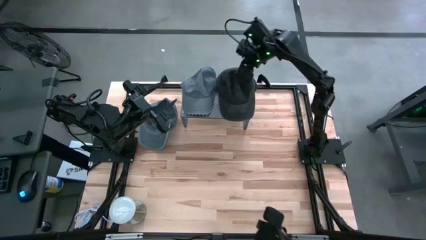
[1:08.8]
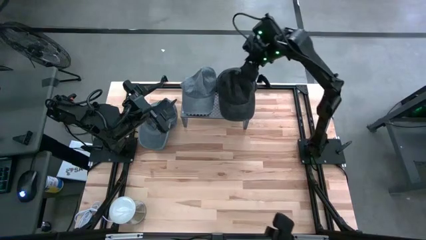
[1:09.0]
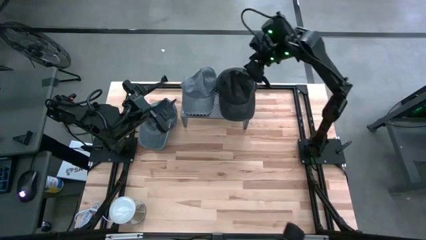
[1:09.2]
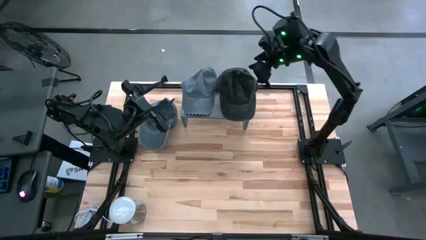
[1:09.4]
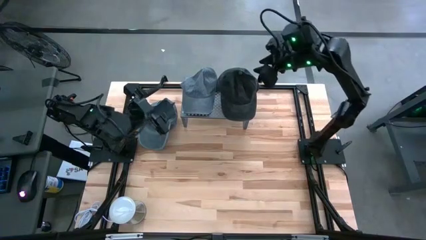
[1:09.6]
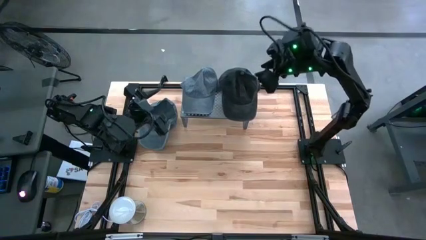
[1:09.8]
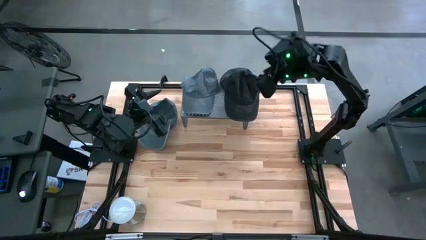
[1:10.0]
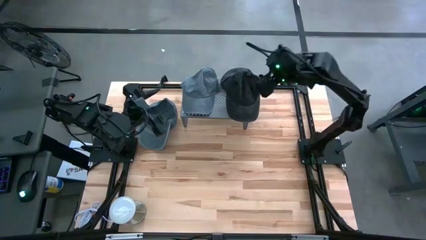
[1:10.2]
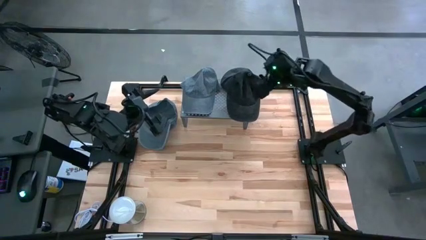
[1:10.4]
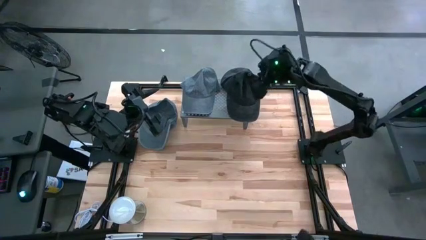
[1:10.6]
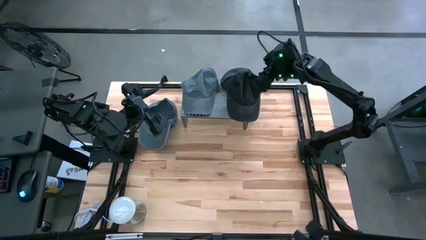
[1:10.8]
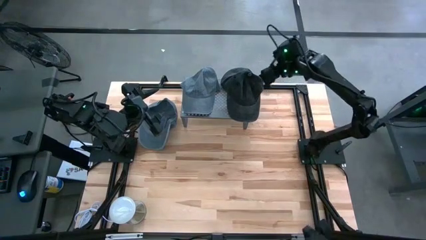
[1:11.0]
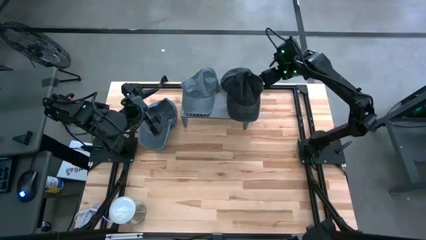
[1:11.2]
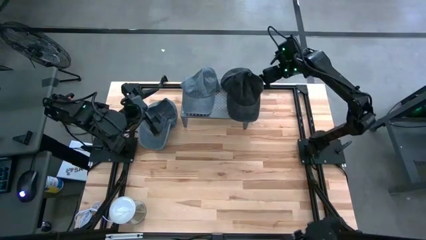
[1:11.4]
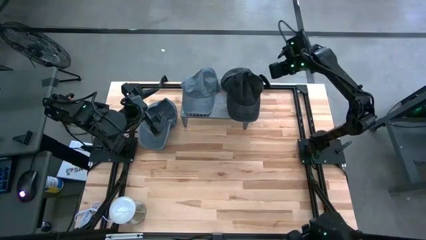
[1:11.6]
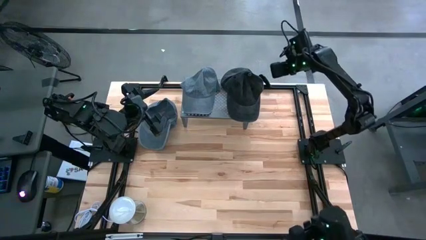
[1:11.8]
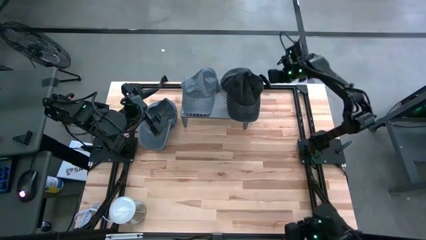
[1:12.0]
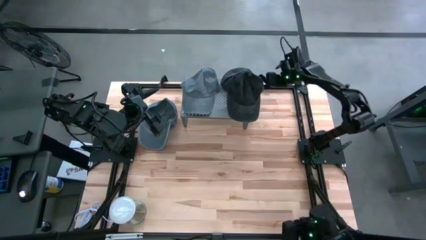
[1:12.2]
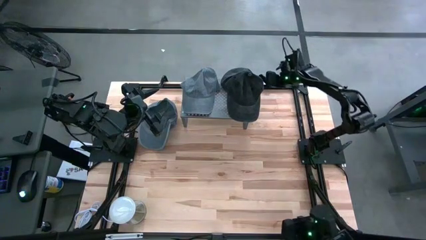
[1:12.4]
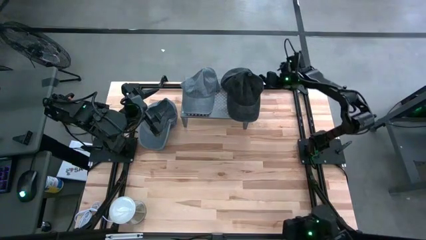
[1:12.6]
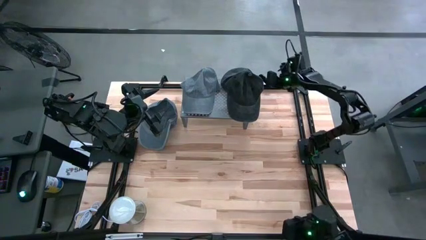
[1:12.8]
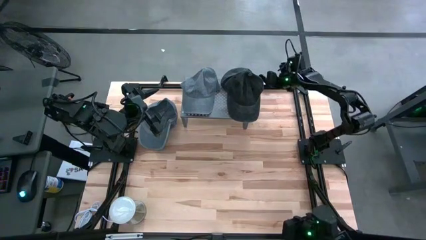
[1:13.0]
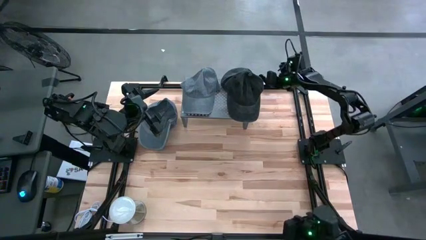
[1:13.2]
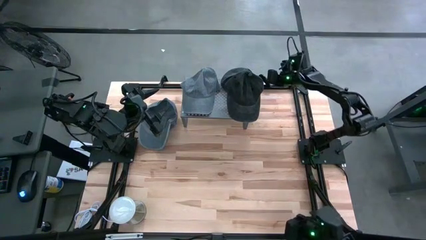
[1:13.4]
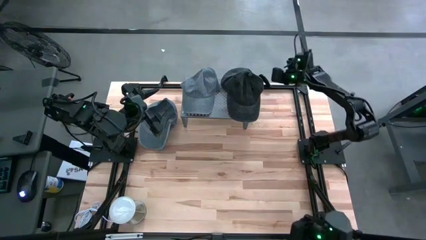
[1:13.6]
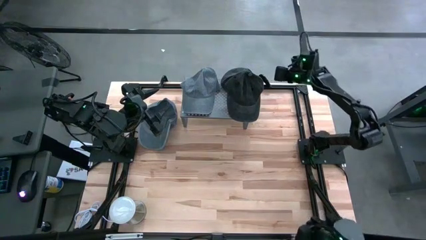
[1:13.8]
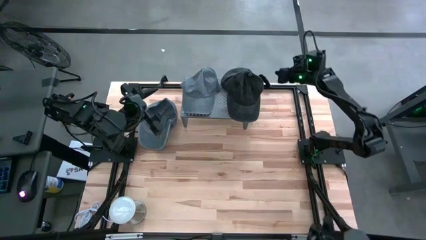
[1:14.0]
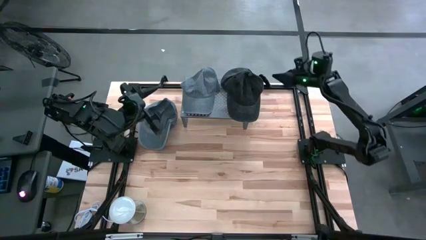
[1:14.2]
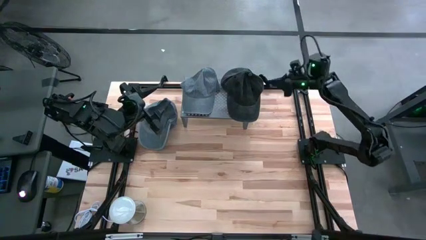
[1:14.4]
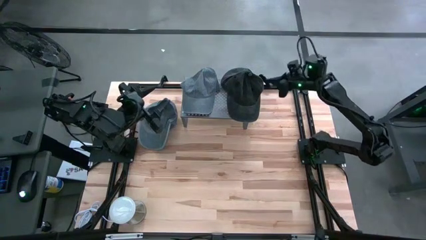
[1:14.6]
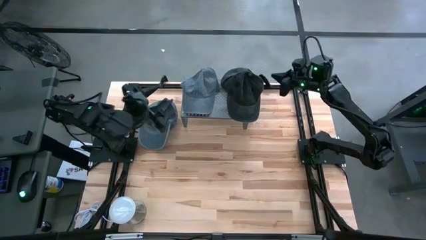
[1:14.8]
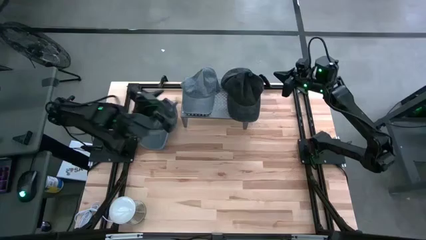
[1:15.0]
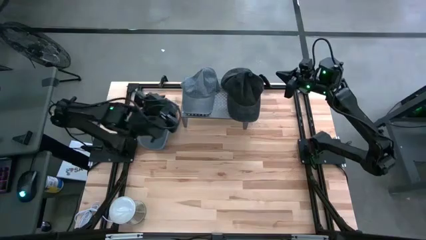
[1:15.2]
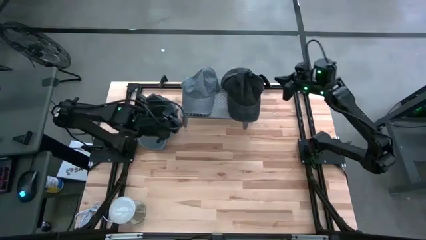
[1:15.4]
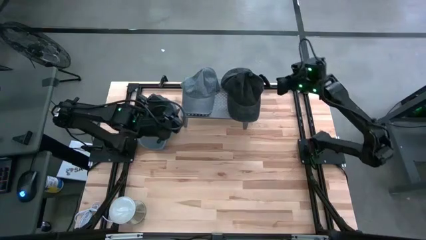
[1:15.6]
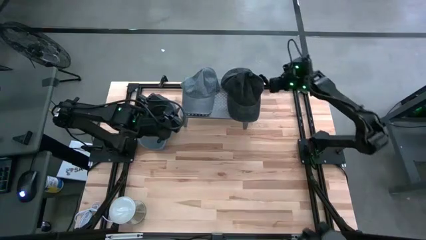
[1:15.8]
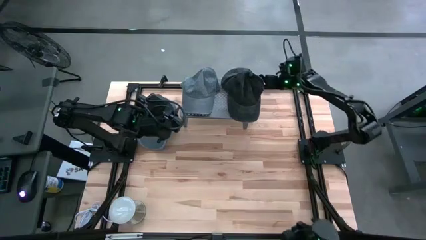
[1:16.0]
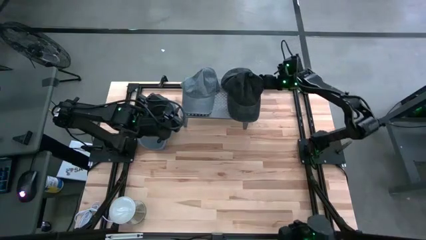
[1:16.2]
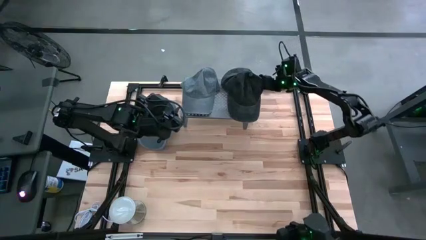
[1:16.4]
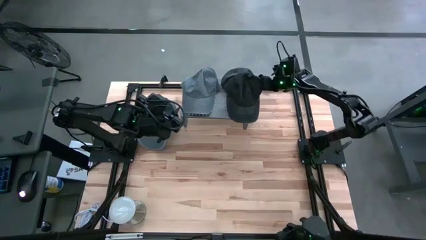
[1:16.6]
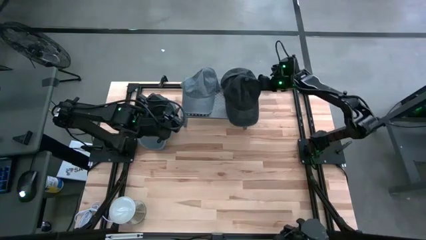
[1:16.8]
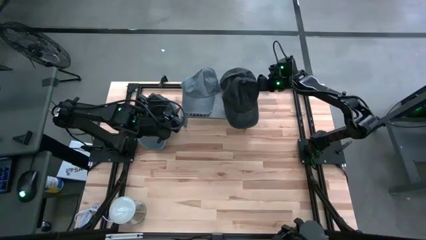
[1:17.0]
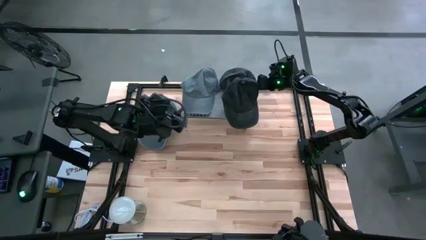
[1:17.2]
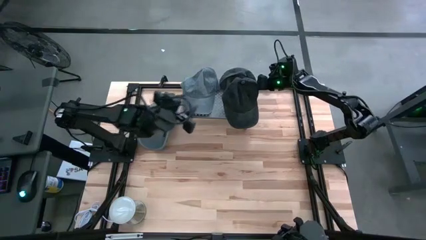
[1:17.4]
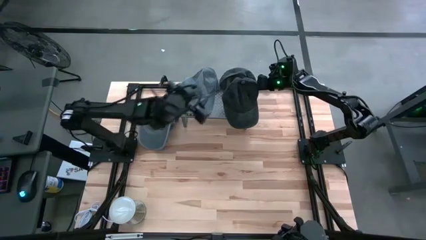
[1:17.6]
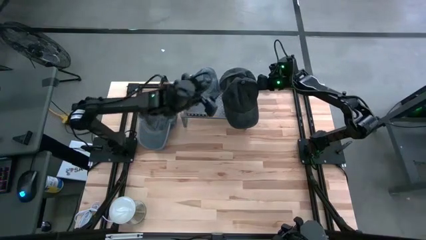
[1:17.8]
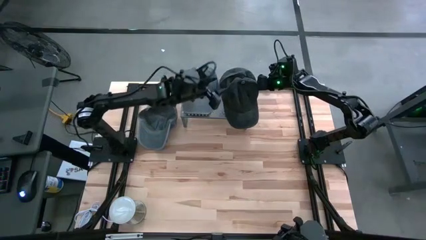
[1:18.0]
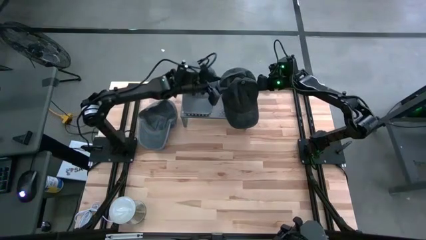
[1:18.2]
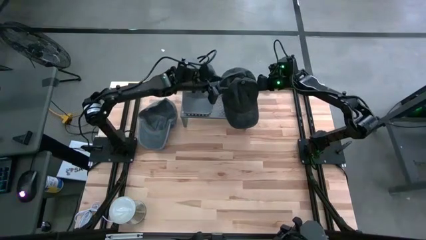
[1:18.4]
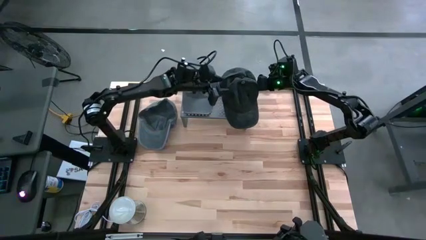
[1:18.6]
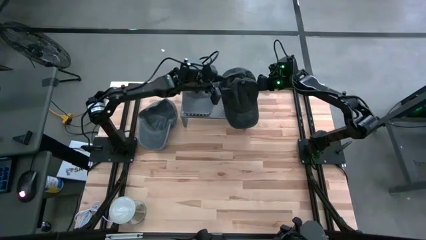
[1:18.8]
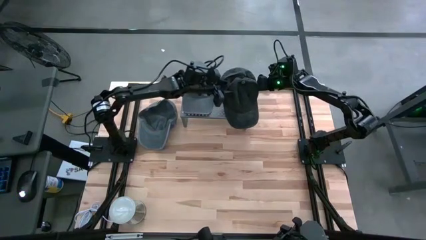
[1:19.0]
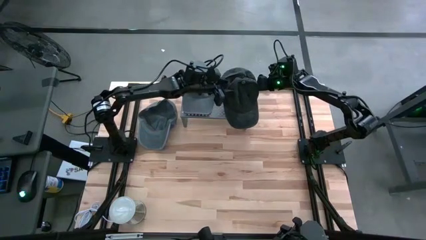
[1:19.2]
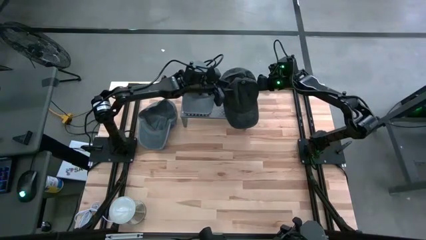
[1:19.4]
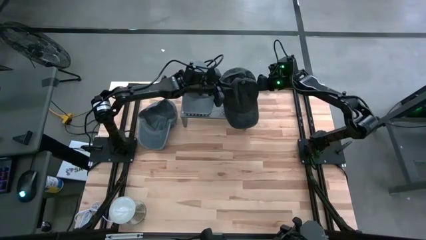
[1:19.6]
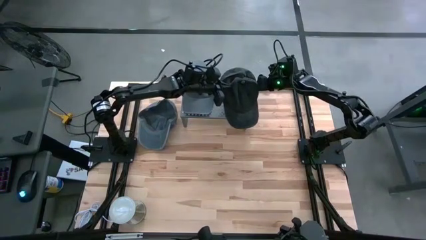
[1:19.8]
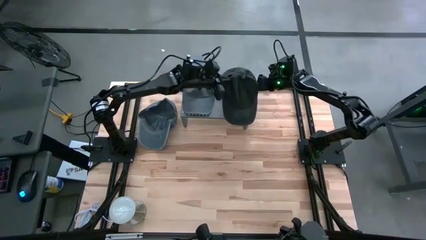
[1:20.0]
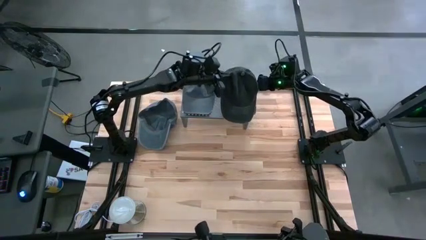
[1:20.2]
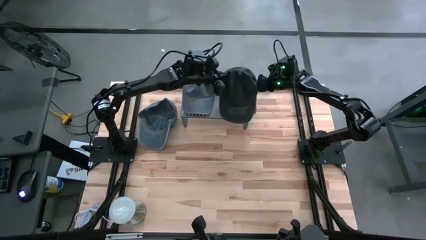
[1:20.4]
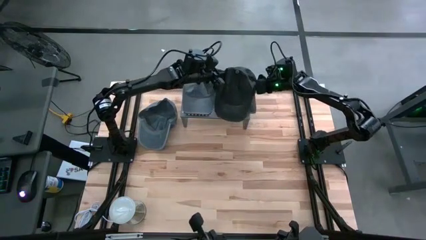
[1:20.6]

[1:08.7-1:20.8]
Task: Pick & Place hat
Adjust the black cap on the shelf

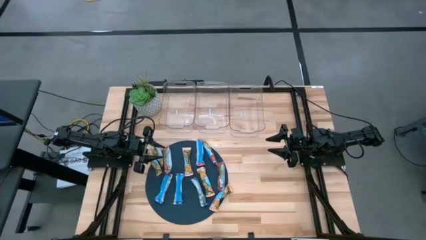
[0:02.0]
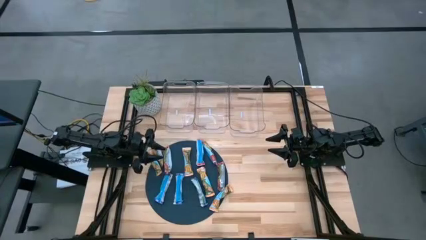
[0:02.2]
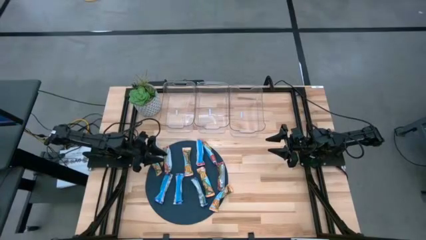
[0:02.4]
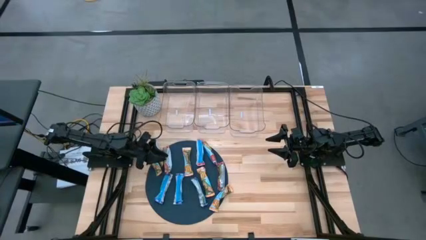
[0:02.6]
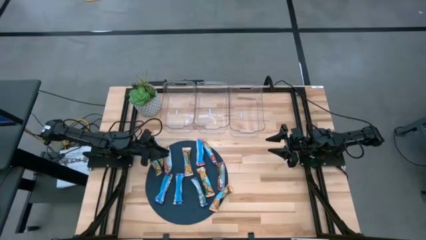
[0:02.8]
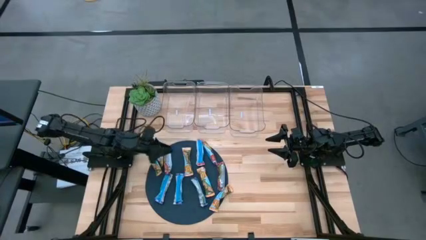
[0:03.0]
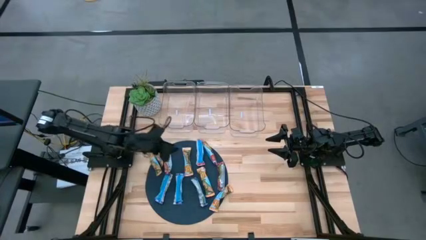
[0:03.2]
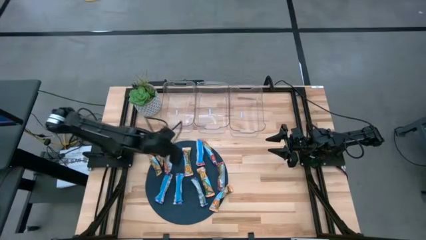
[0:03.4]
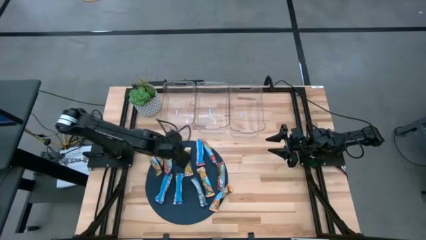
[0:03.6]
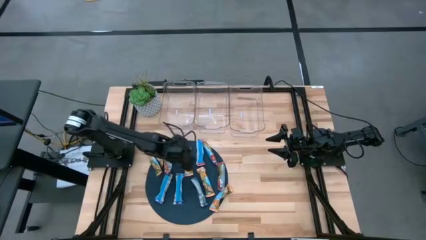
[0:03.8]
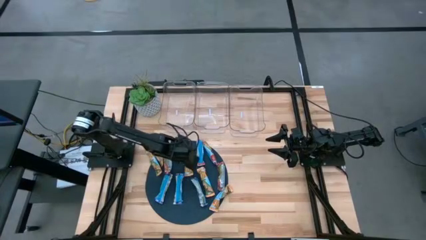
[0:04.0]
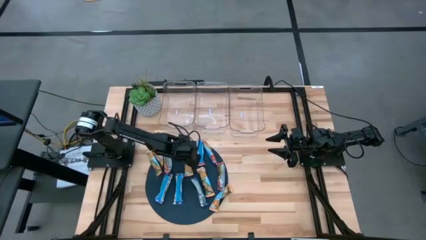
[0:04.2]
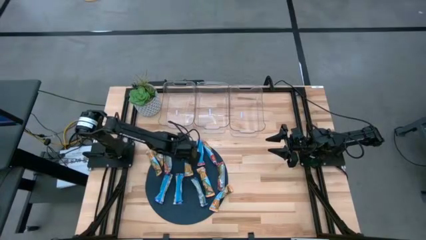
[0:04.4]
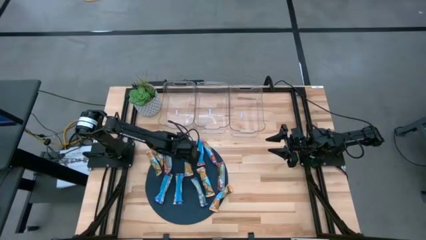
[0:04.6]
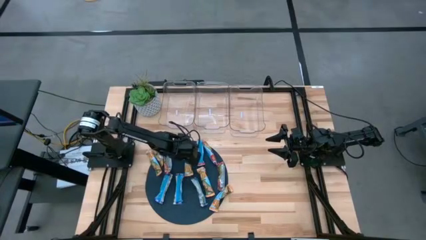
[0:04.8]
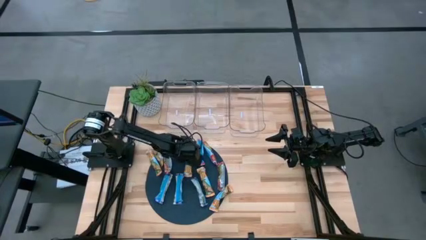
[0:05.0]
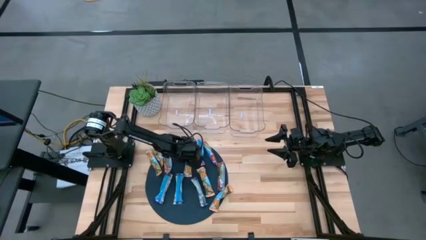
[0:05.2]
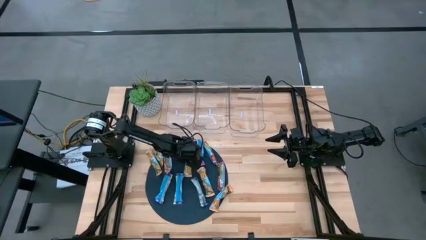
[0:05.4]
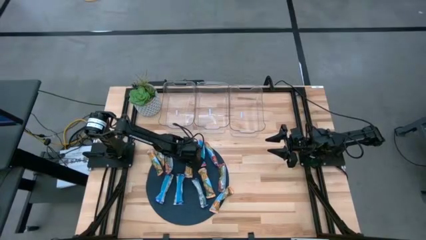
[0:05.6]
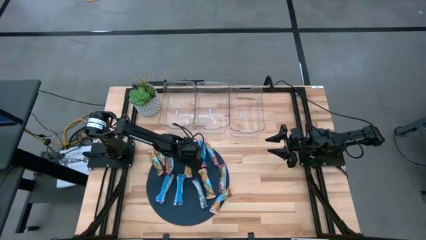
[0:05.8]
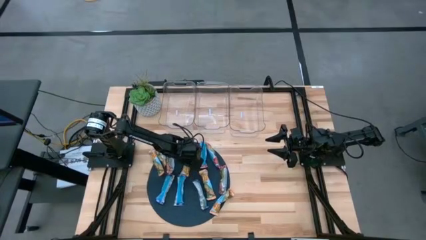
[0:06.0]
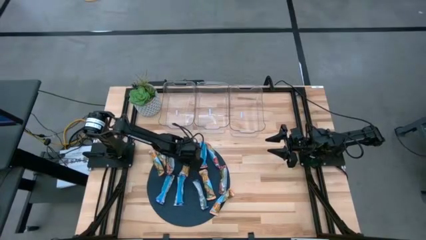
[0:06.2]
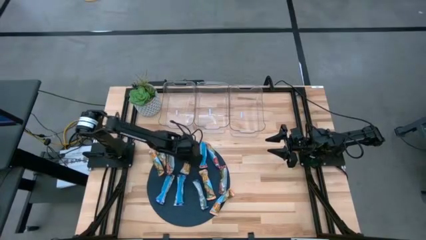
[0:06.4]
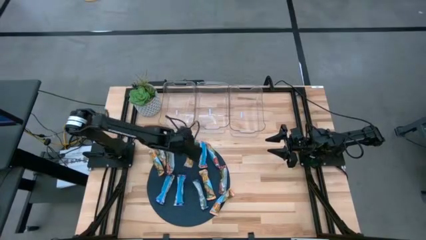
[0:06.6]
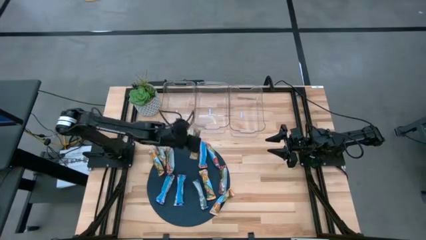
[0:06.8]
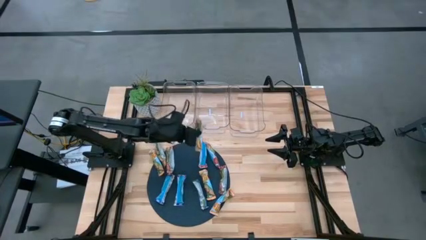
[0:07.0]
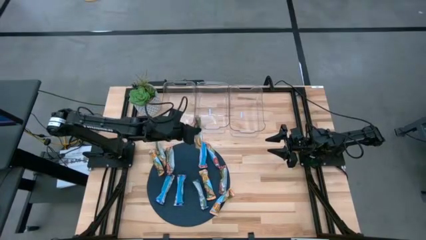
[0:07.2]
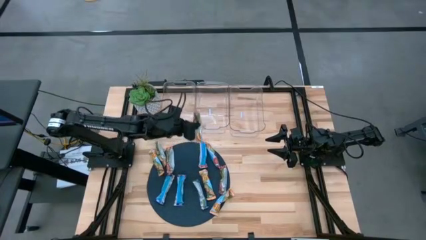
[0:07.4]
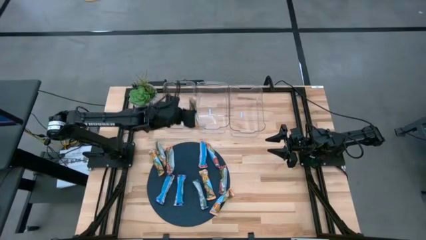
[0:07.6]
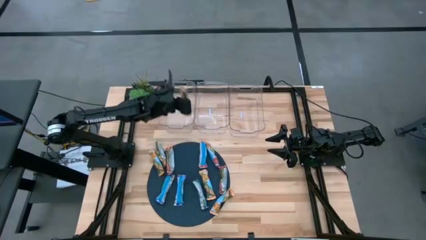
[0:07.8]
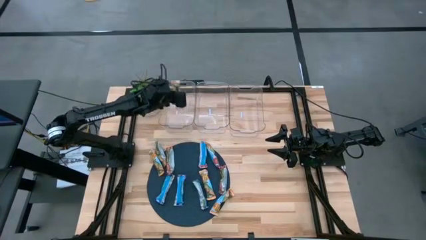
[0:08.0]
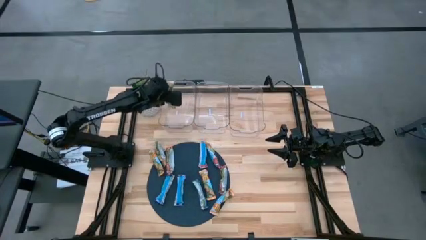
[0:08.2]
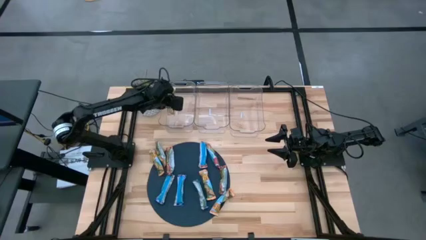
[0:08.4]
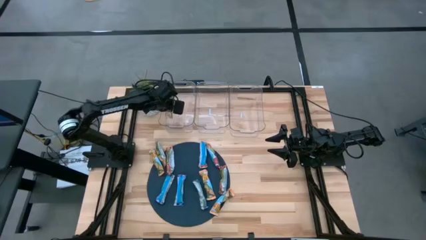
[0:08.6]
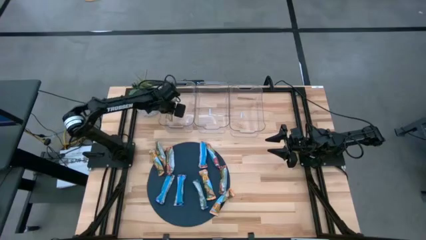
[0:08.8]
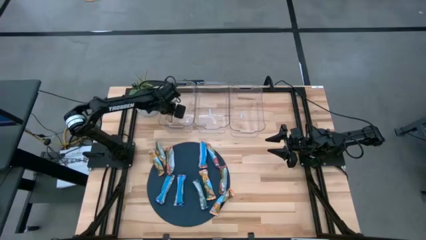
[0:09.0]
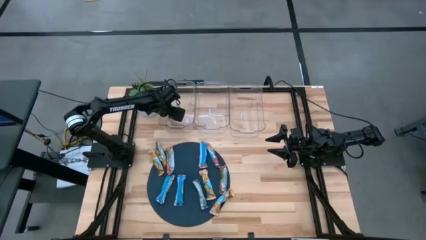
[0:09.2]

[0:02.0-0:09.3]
Task: Pick and place Granola Bars by type
Put the orange granola bar into the left transparent bin
